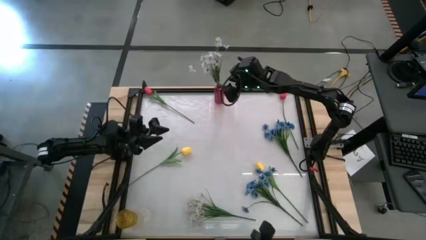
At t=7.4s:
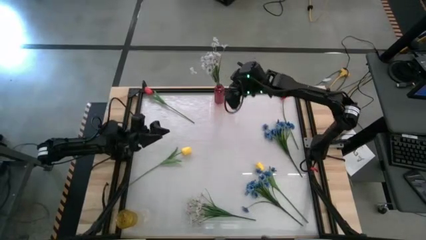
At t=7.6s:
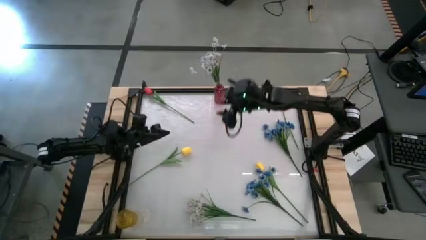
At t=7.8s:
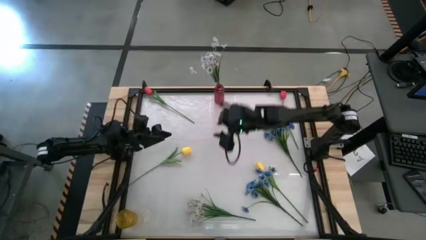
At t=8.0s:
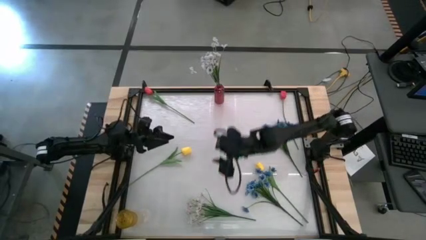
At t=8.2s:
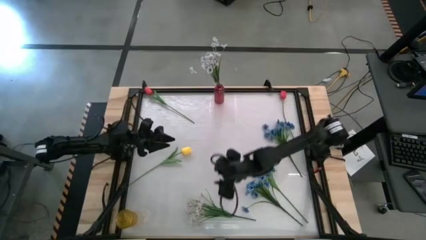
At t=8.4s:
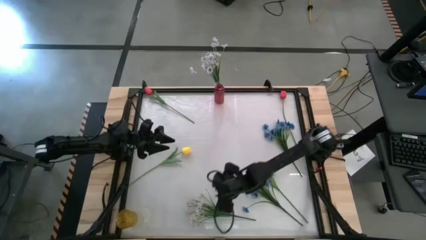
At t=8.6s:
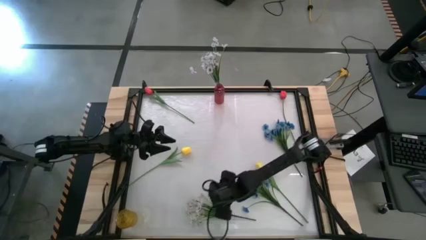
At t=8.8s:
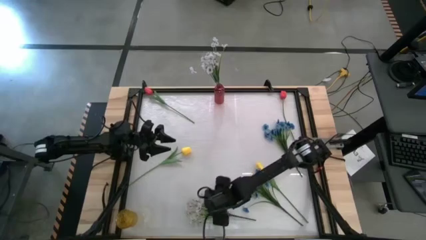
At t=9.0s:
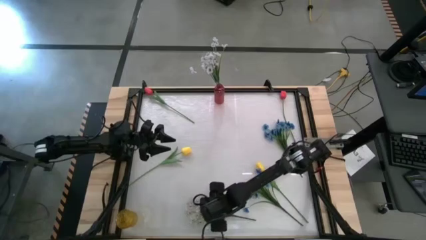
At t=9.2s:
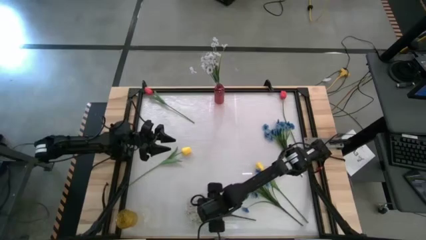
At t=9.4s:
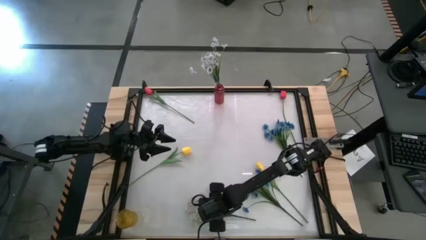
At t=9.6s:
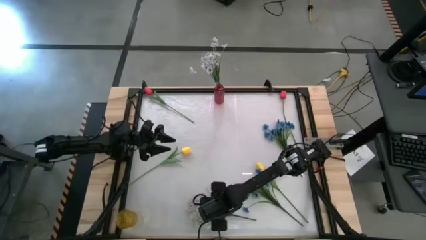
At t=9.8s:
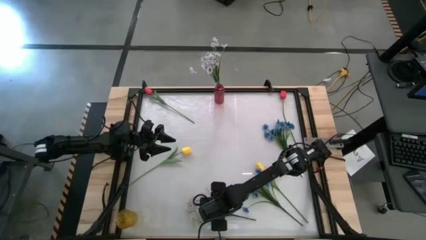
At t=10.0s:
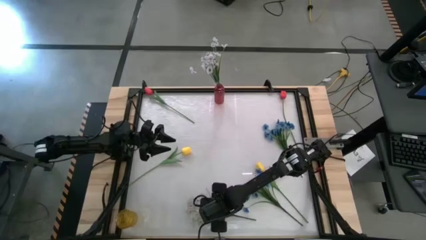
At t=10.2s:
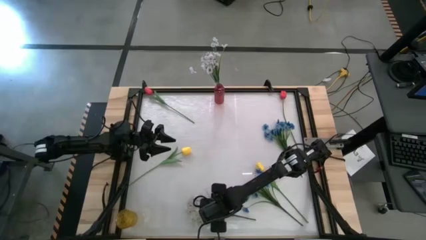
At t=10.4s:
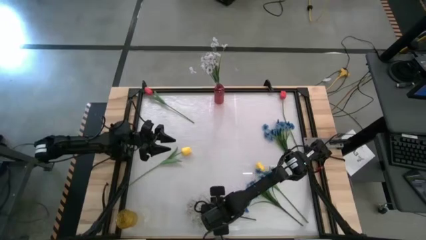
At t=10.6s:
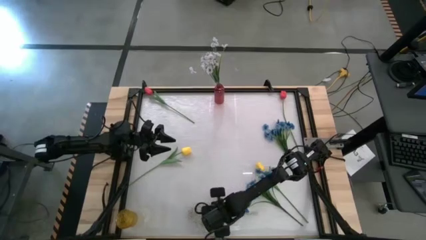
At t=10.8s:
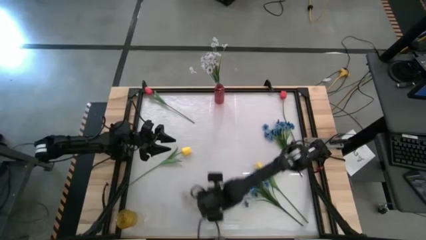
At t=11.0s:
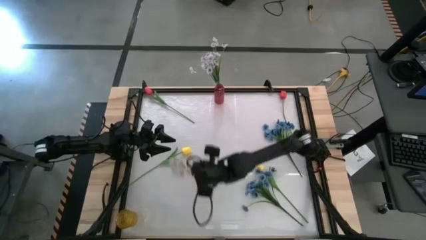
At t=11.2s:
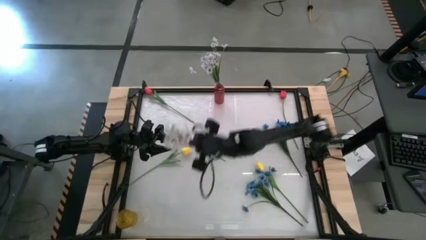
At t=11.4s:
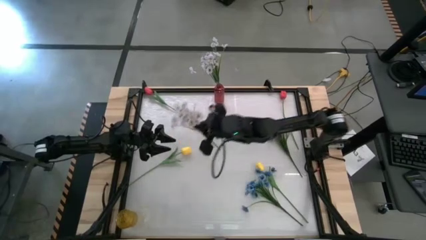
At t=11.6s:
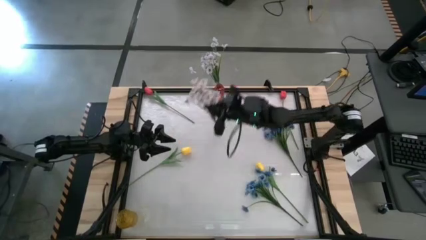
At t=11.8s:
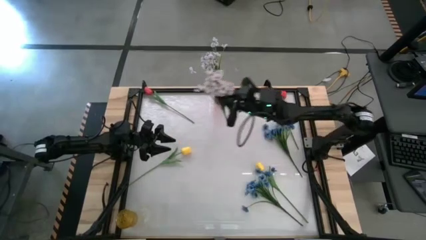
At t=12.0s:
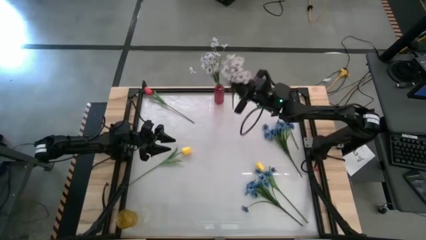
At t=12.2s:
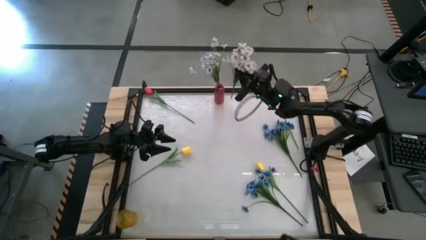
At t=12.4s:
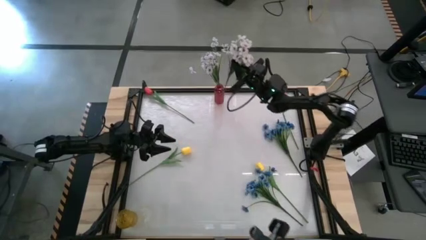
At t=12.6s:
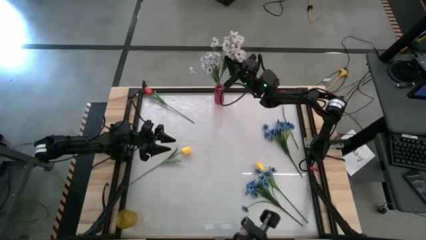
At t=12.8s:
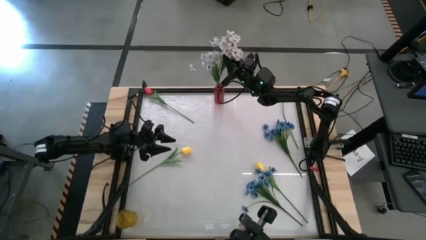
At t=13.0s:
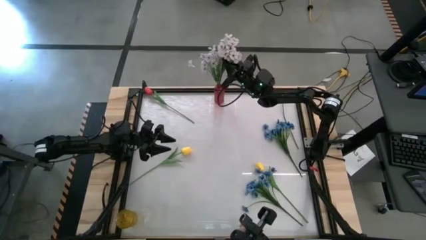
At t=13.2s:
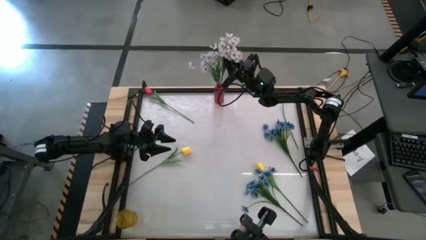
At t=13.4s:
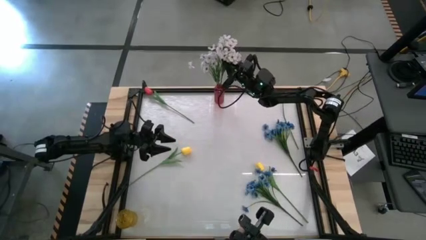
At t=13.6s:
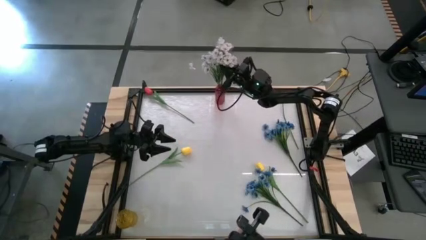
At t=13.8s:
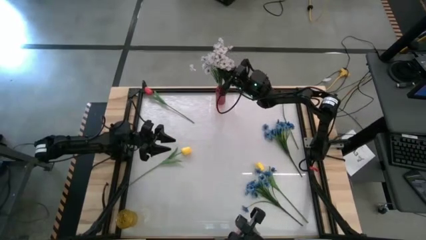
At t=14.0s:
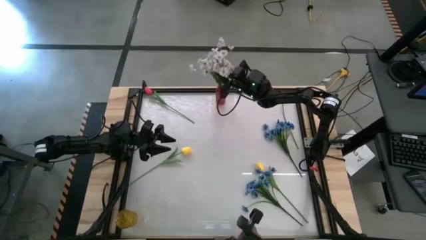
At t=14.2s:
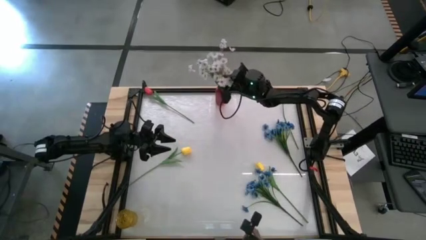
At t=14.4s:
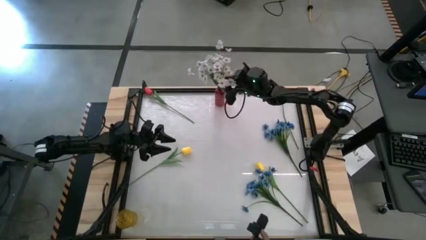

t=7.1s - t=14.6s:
Task: Sort flowers into vase by color
Put the white flowers into the red vase

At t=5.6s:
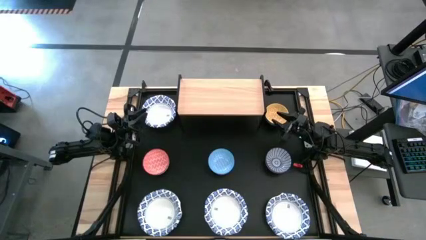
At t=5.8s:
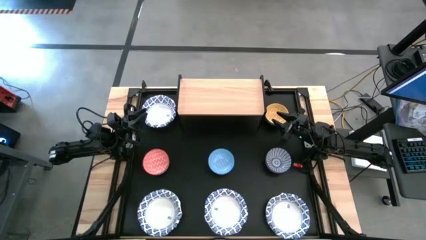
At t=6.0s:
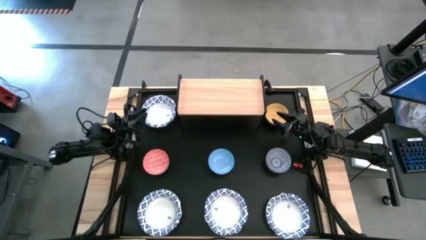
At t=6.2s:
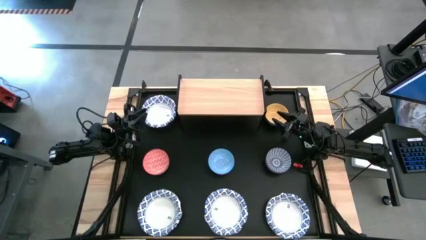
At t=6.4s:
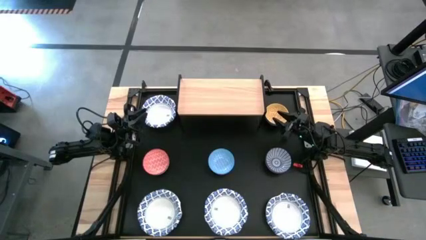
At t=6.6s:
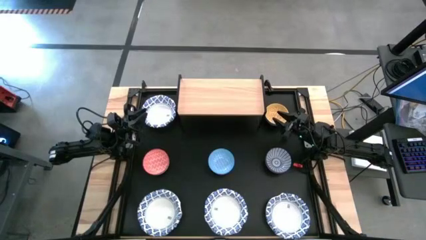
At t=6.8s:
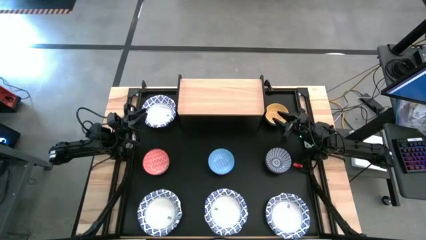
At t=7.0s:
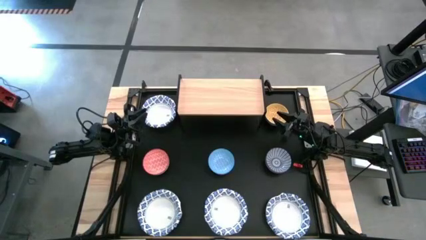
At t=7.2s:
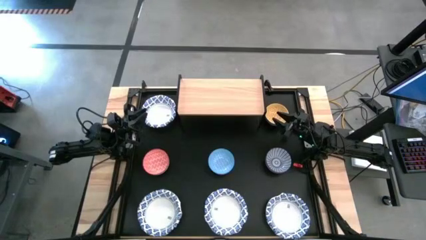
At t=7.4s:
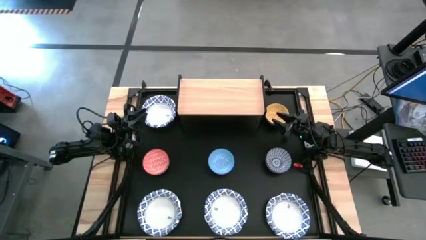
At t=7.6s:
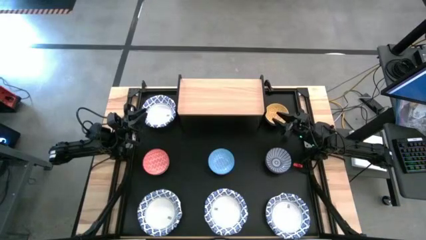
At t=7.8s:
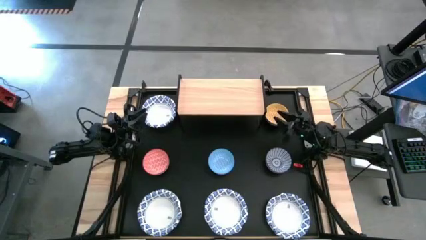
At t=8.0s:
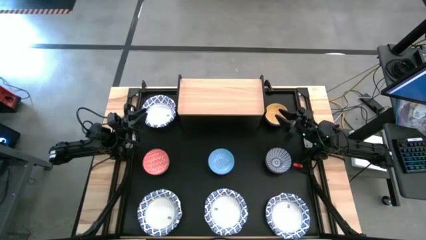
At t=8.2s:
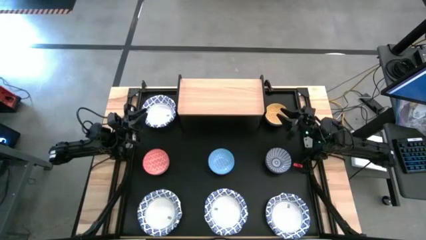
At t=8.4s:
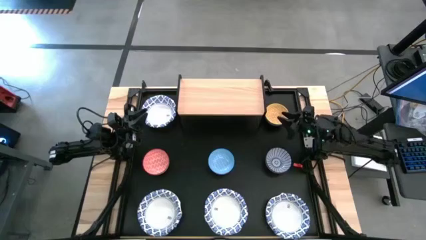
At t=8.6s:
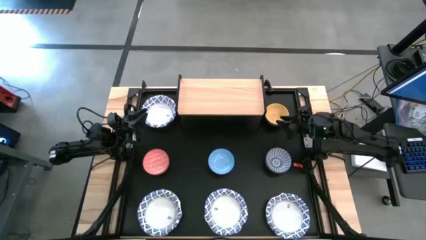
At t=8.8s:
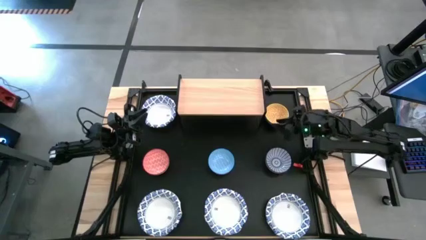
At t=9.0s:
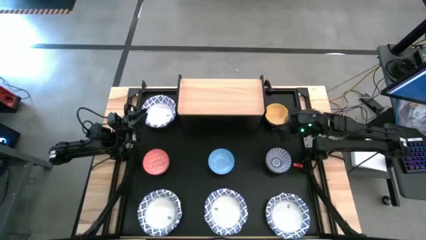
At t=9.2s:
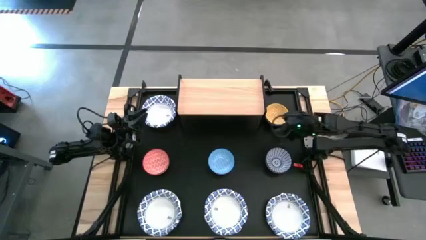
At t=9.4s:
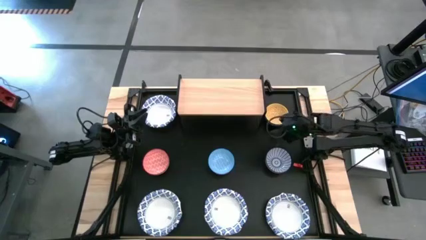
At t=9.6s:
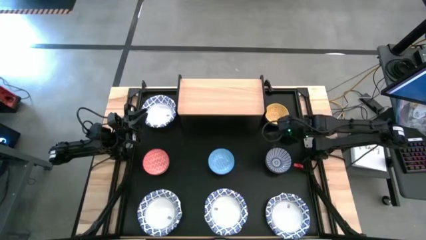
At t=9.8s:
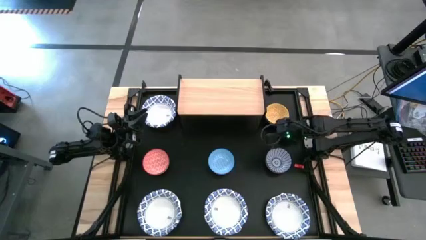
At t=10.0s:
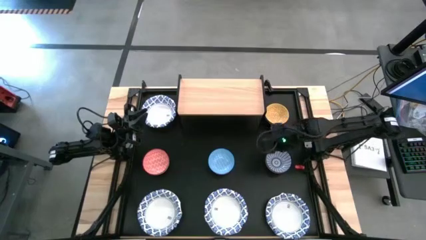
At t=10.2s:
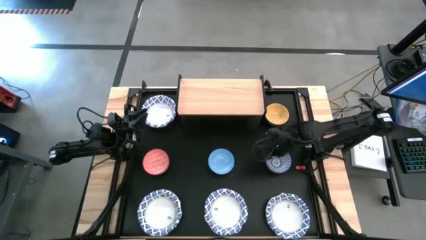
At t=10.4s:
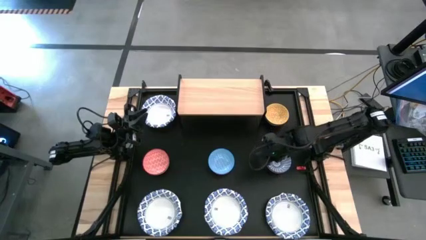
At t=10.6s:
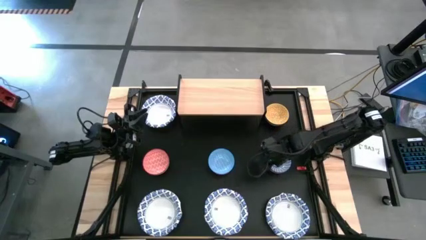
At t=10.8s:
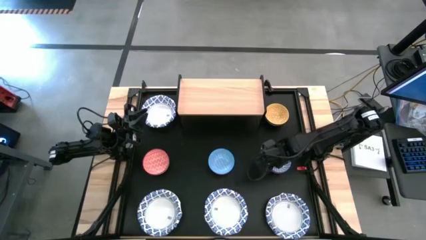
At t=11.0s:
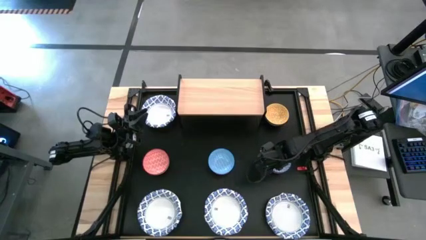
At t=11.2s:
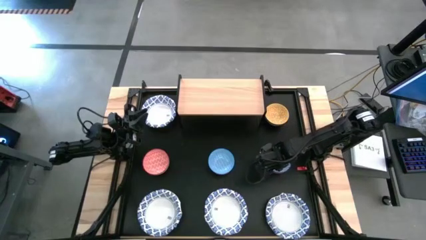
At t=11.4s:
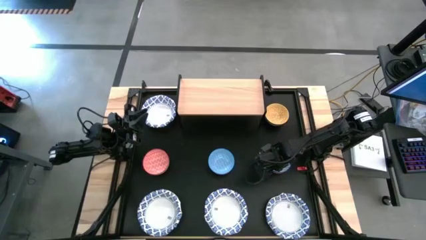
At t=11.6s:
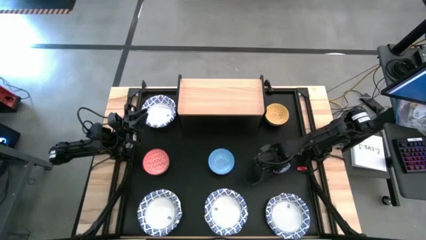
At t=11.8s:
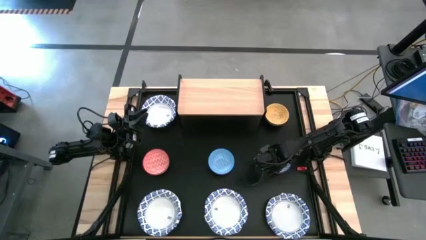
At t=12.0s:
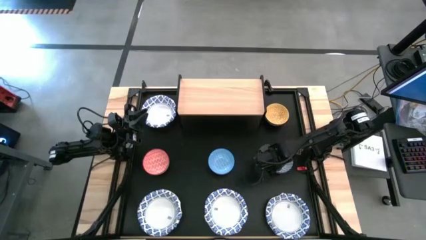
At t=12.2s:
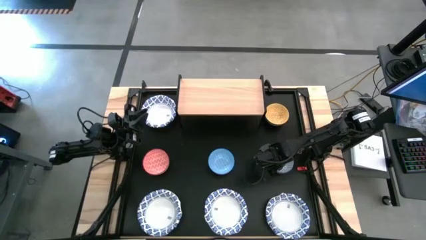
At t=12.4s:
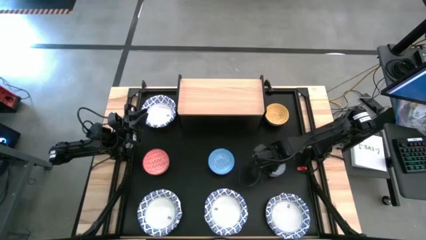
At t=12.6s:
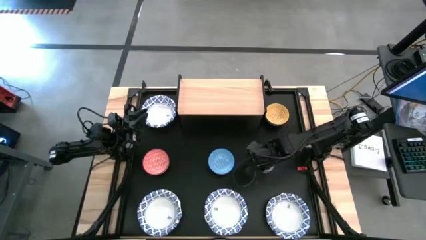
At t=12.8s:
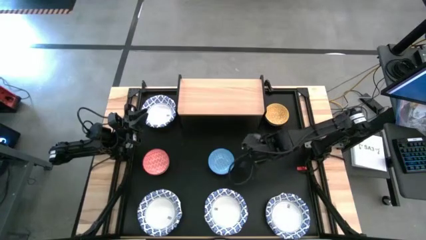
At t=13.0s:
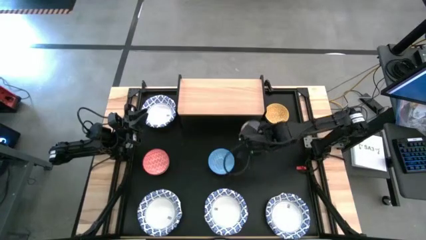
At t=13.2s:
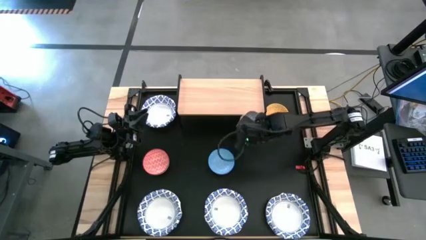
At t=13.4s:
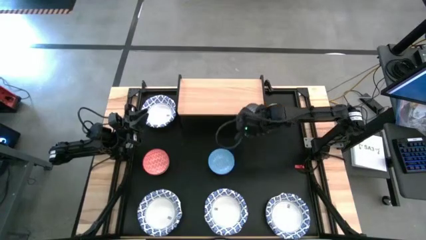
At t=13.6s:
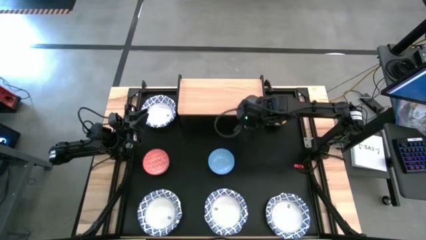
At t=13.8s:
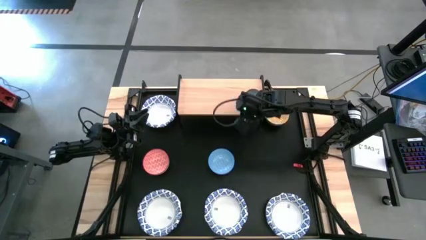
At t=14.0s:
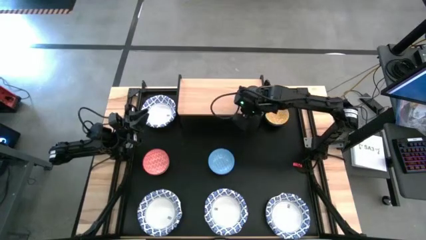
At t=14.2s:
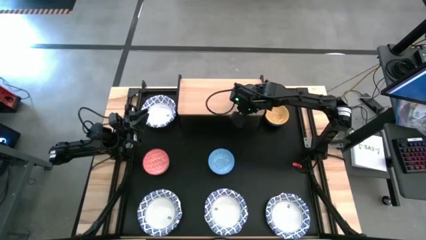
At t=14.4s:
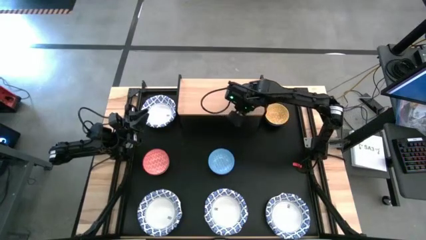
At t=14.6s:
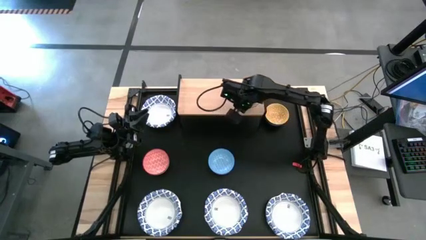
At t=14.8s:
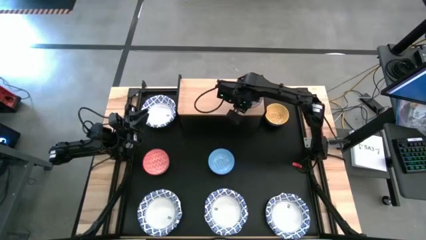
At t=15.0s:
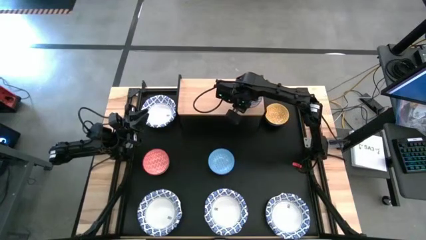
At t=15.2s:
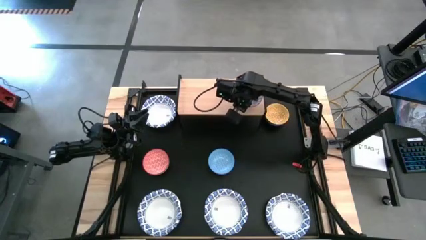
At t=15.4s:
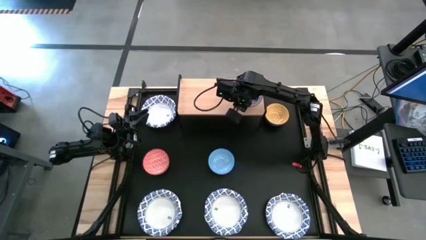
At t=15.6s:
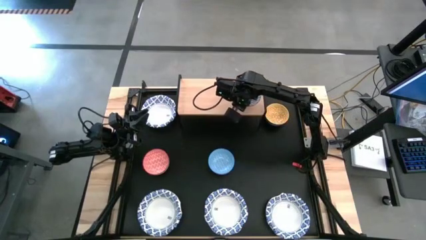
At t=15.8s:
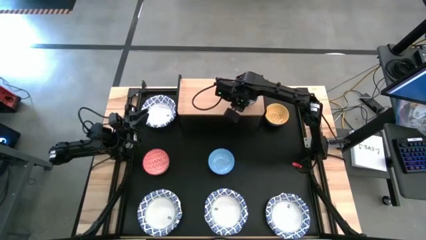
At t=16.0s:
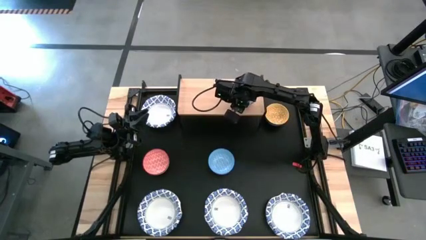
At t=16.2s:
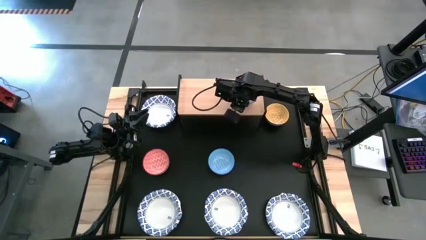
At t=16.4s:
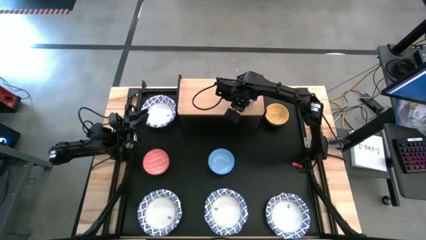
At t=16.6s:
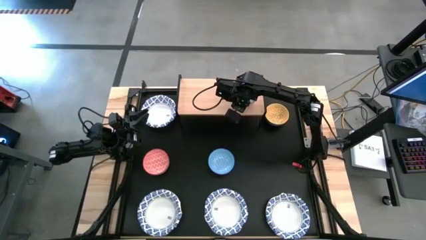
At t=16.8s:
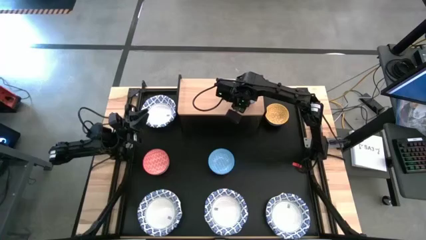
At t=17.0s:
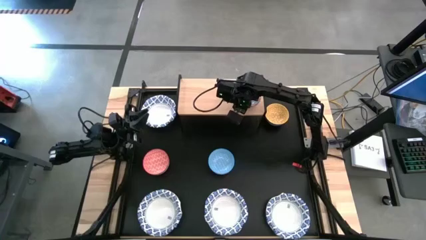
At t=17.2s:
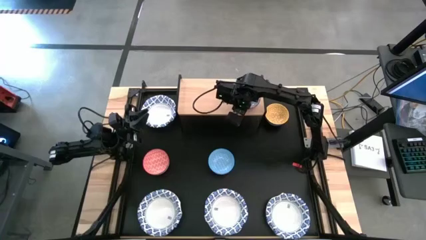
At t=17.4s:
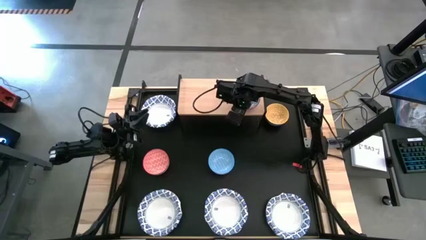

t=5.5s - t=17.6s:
Task: Place and stack bowls onto a shelf
Put the blue and red bowl on the shelf
